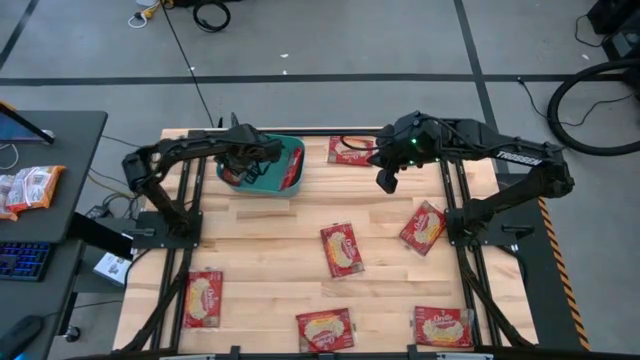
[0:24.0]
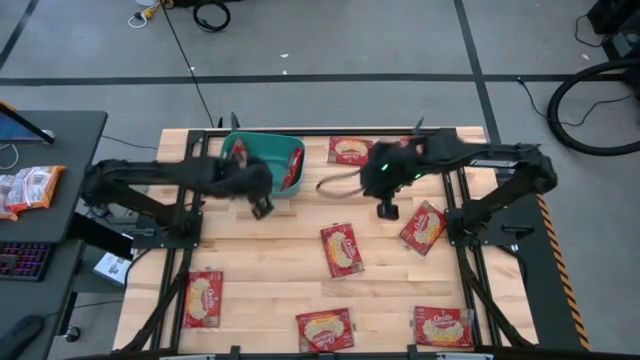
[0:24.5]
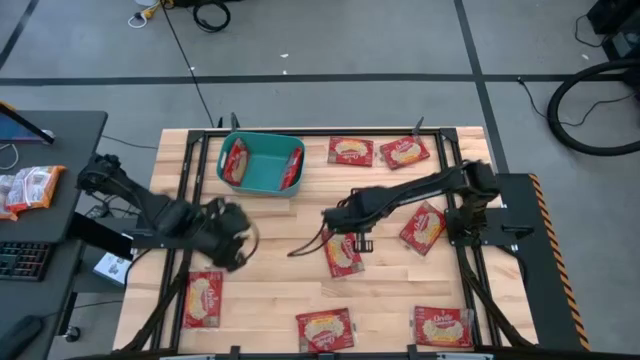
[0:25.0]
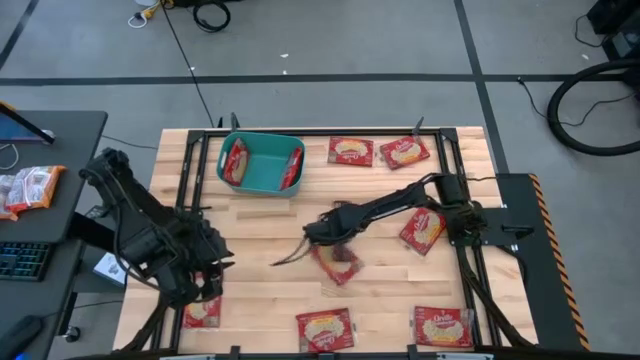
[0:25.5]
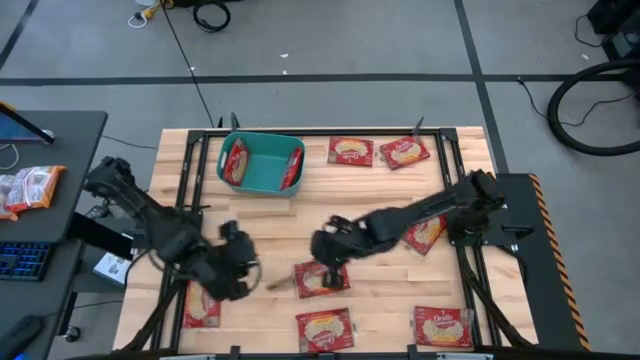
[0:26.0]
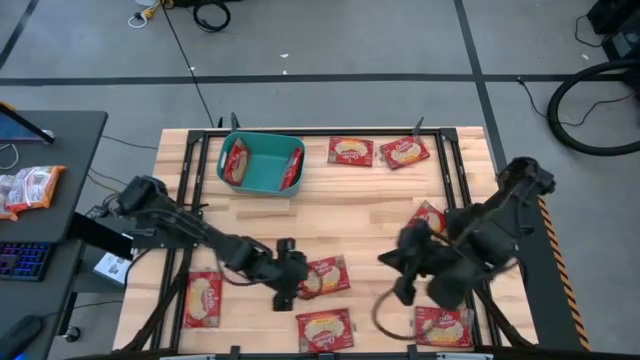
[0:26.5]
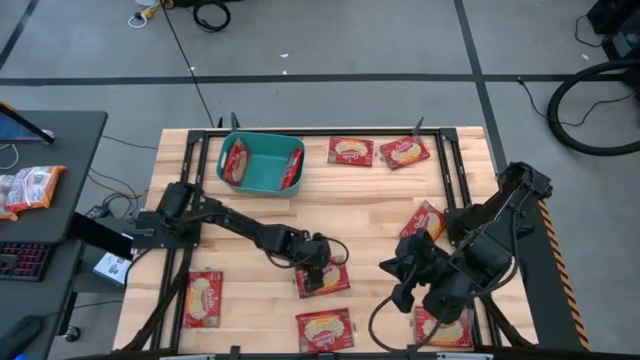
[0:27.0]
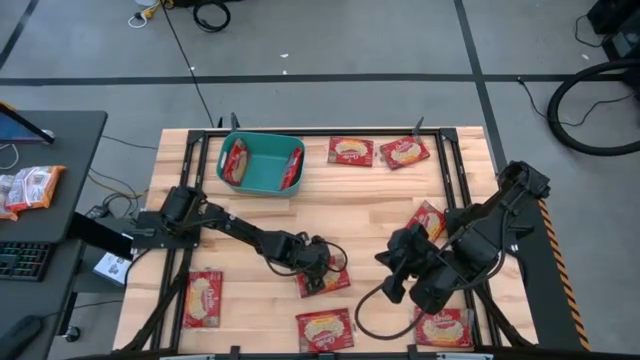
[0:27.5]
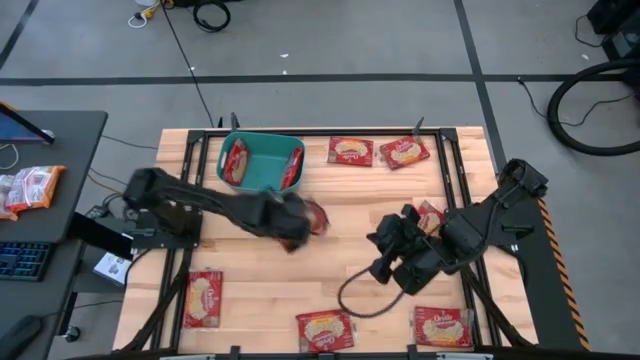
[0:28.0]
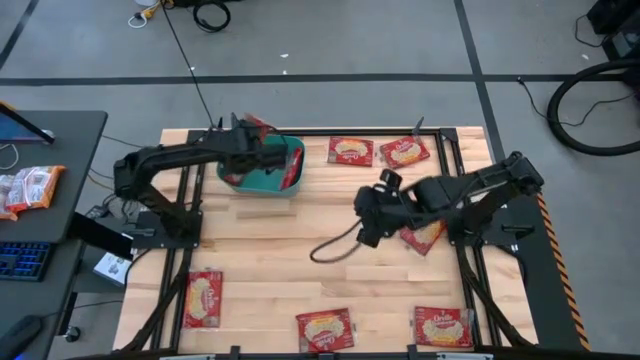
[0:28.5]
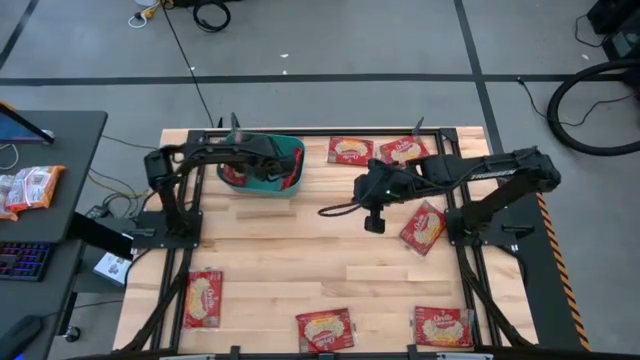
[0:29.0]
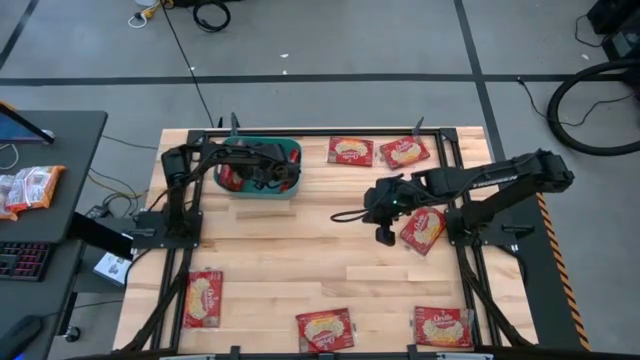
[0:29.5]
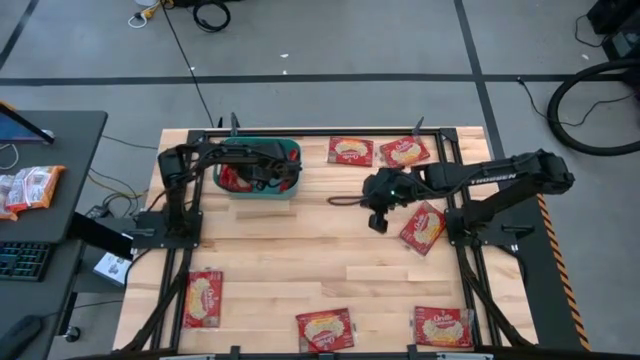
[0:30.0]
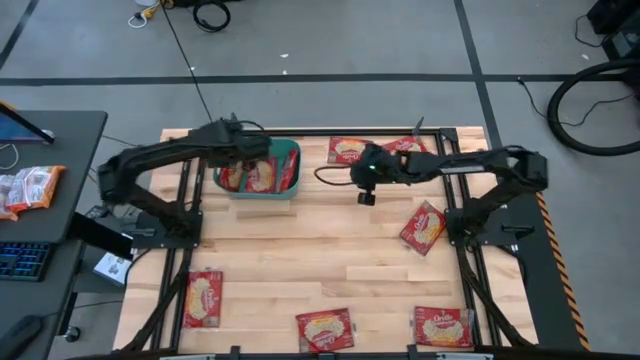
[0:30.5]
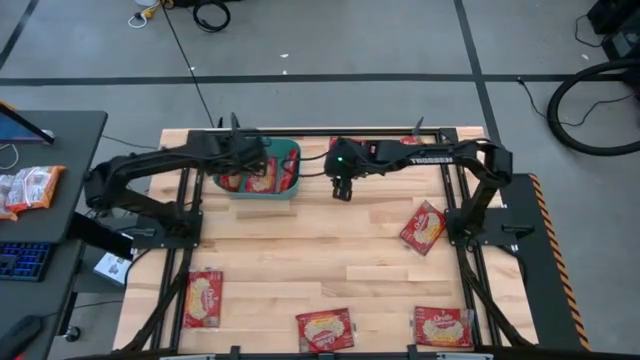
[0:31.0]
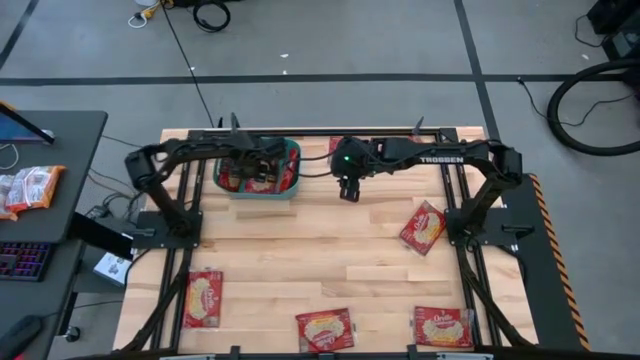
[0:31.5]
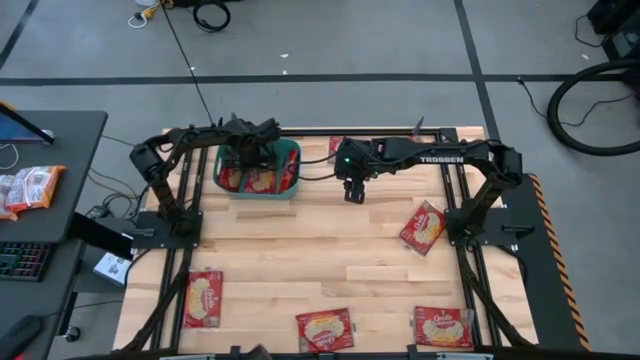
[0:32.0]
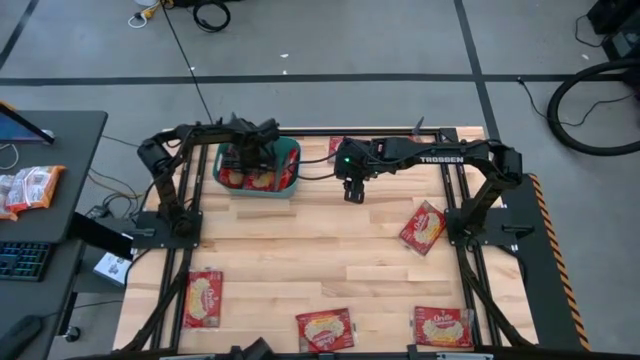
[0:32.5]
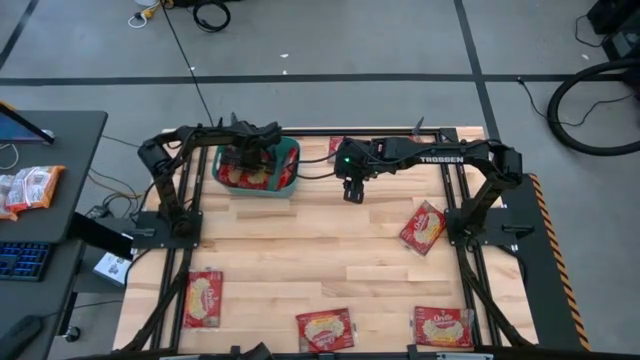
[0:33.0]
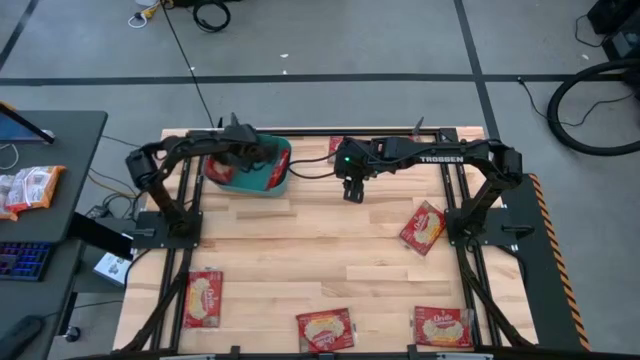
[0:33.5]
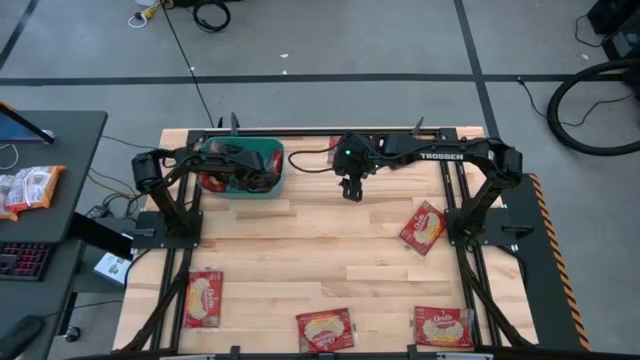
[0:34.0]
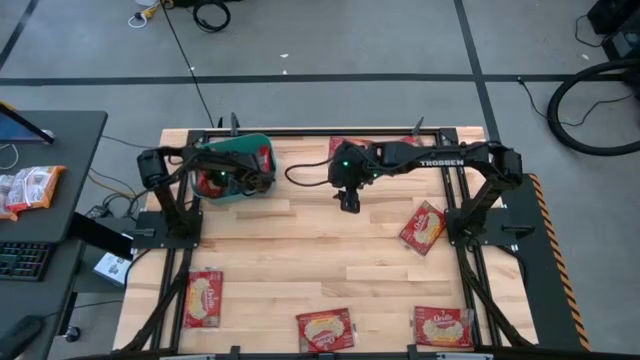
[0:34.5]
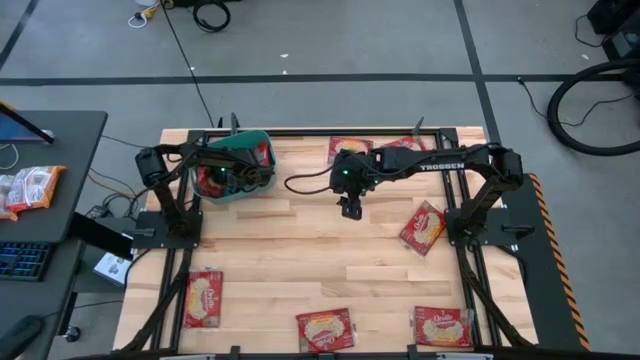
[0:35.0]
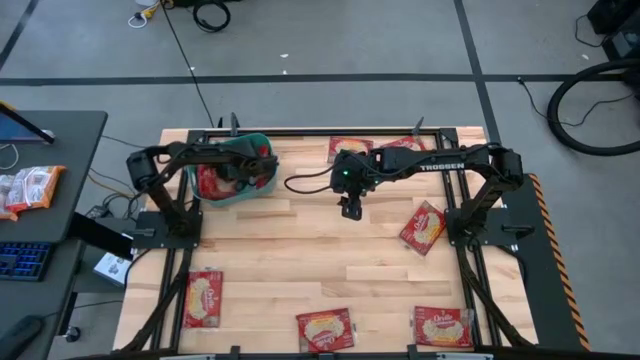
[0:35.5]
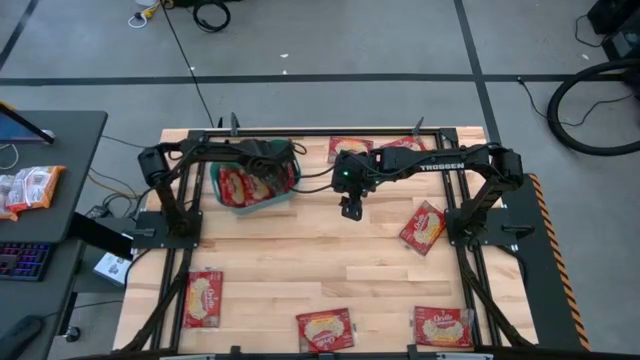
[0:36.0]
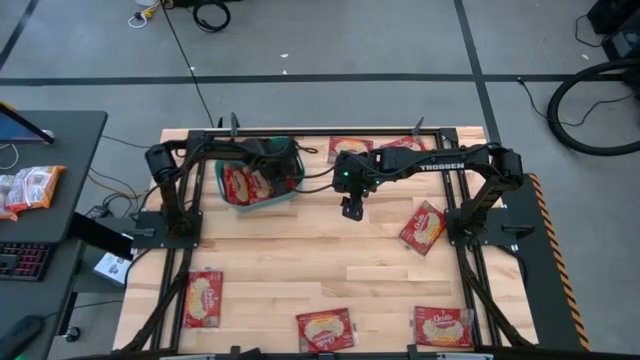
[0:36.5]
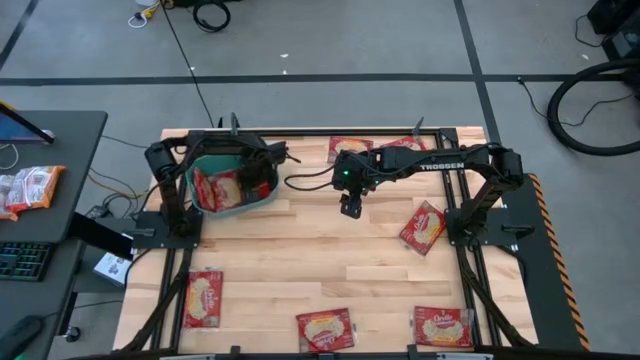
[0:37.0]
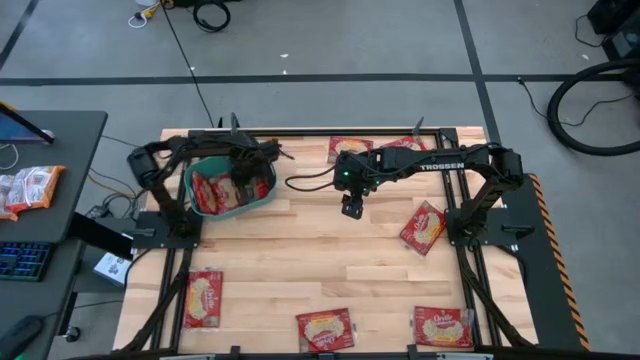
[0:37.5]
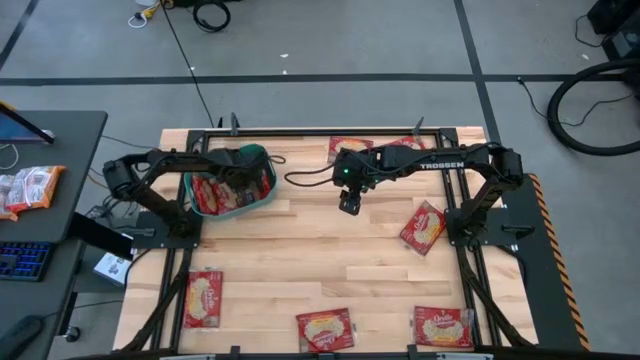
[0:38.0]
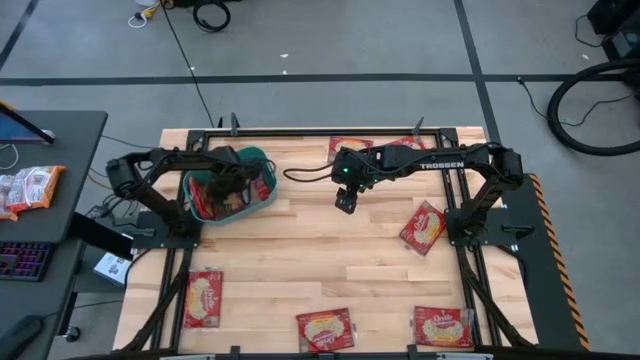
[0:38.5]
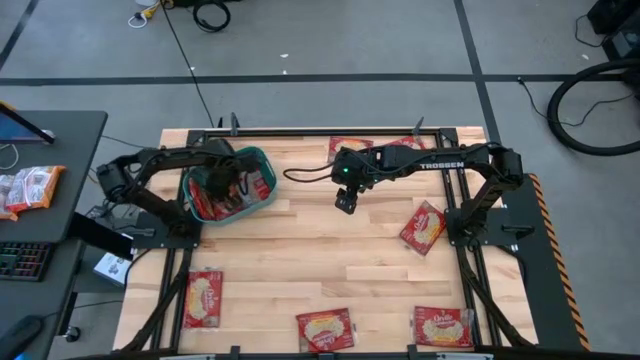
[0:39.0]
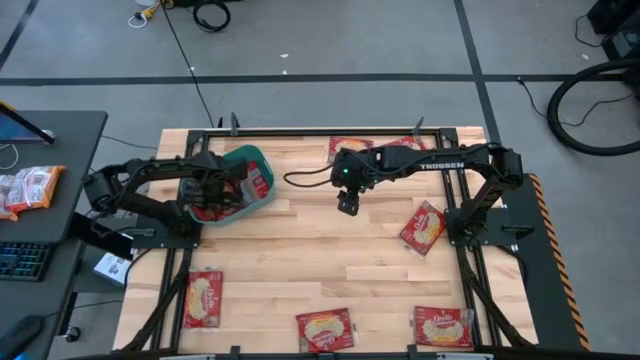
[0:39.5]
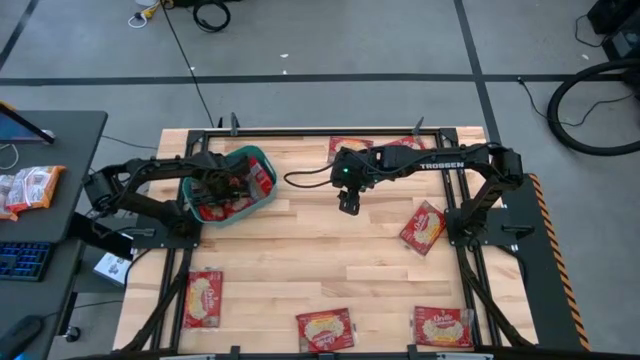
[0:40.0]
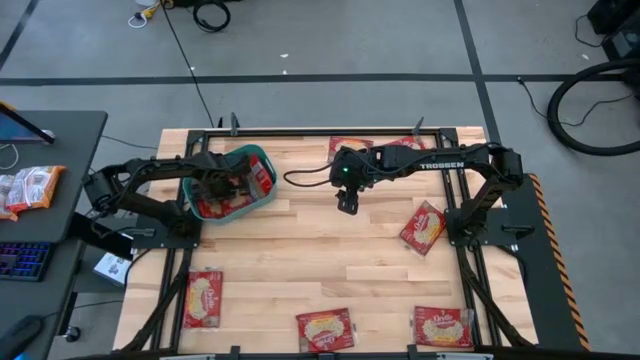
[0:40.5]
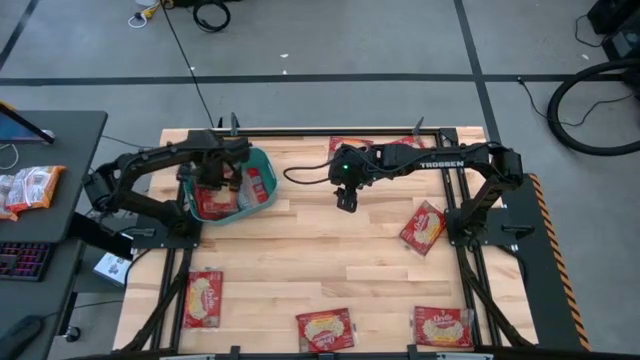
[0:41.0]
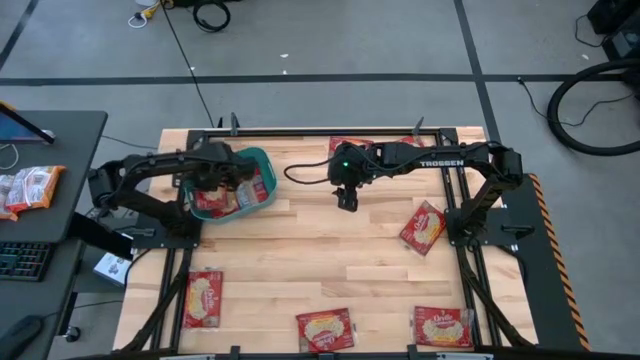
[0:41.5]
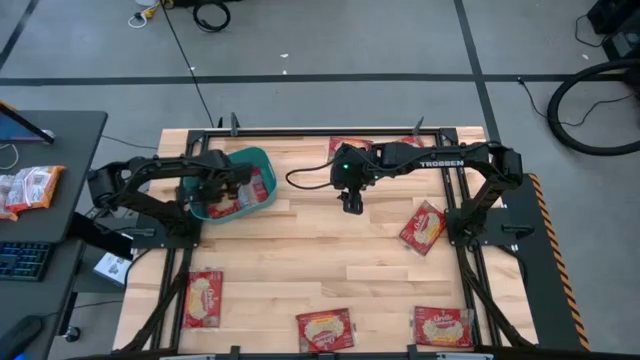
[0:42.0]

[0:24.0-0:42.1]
Task: Sort popcorn bags into baskets
Put the popcorn bag into the green bin

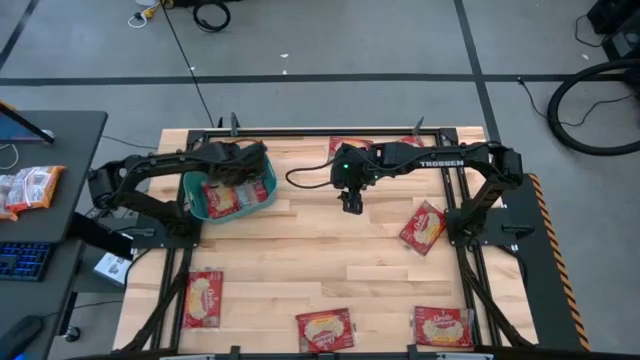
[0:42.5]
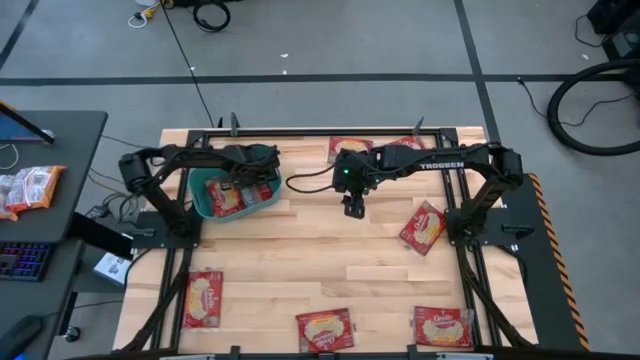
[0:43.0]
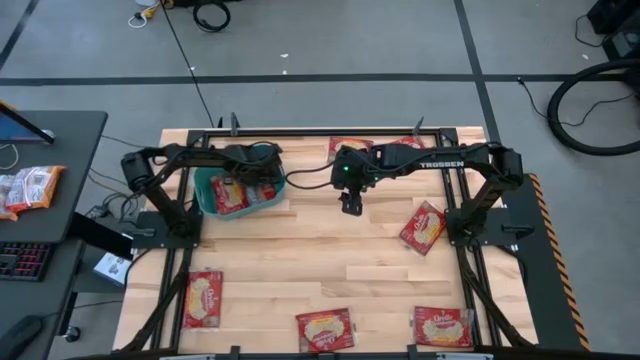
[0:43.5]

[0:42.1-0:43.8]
Adjust the popcorn bag in the green bin

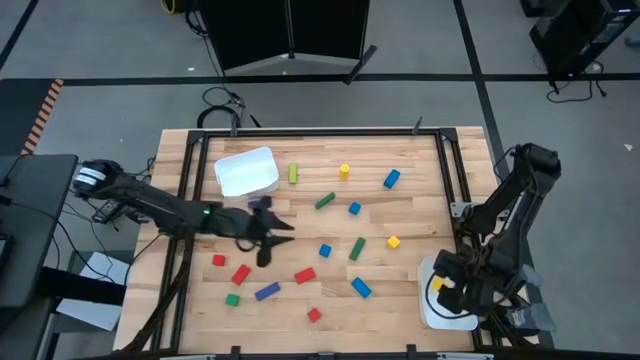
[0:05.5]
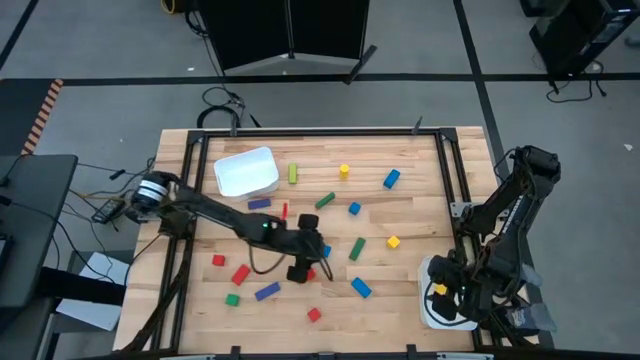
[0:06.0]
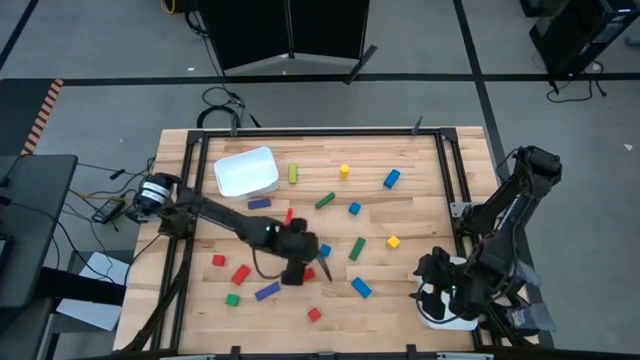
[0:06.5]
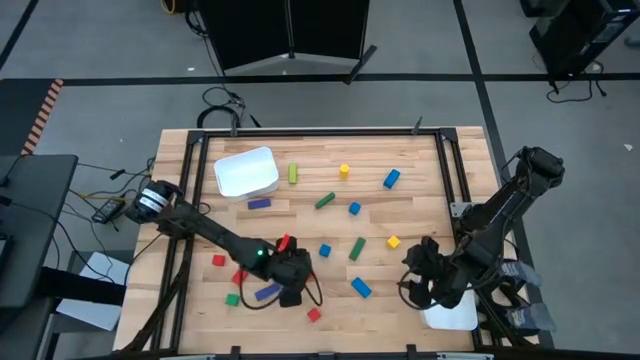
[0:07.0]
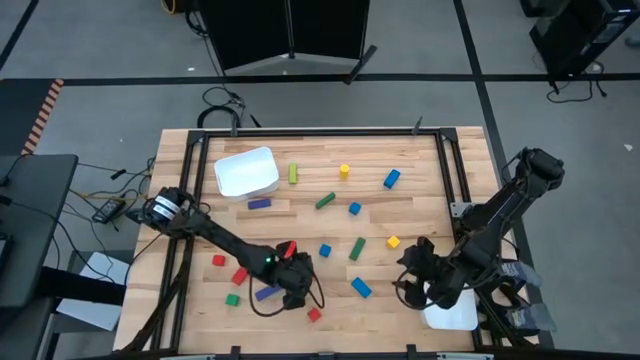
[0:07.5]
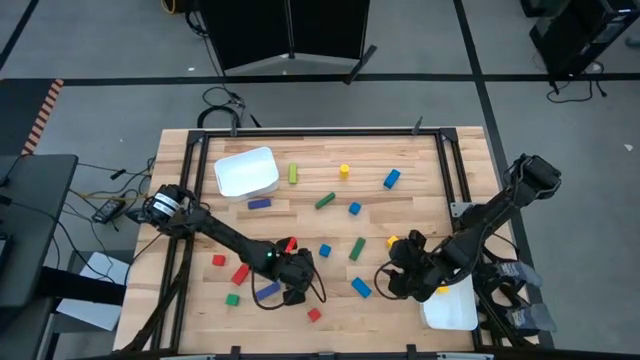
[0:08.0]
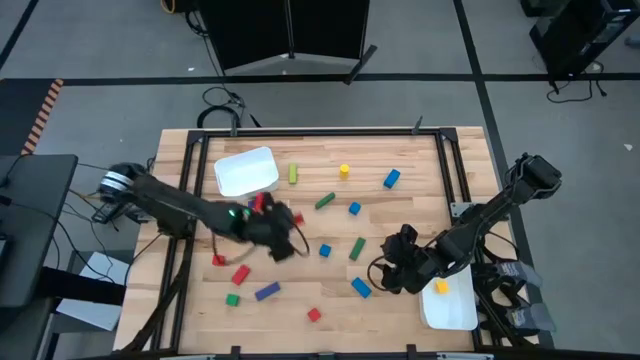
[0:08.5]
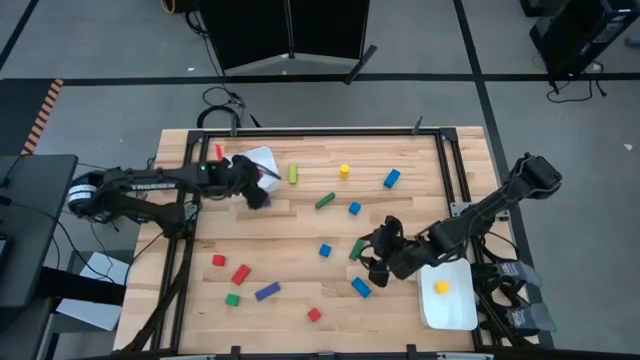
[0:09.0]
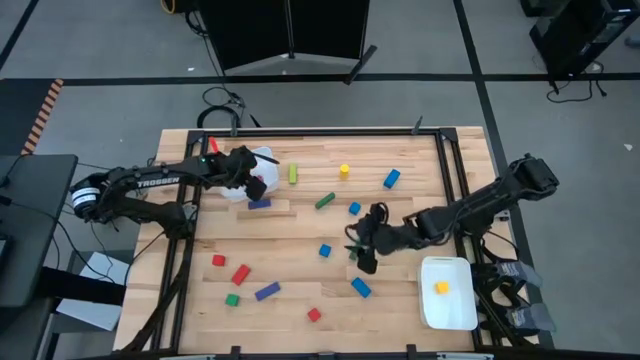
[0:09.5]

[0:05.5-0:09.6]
Task: Sort blocks by size
Put the large red block into the top white bin
